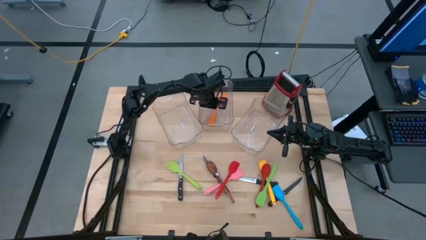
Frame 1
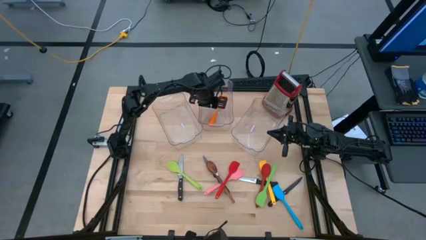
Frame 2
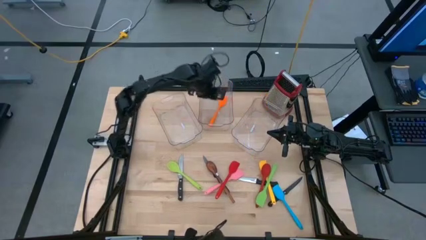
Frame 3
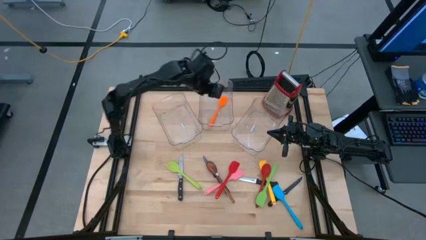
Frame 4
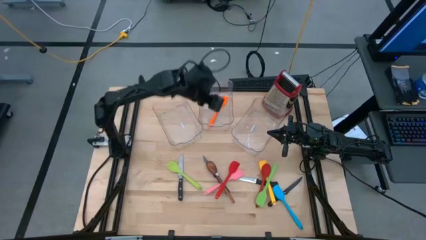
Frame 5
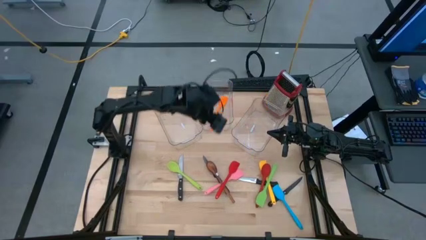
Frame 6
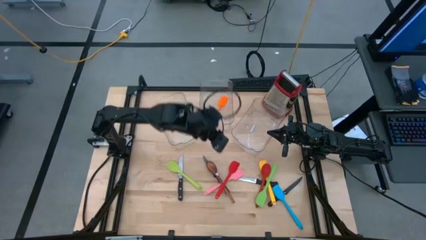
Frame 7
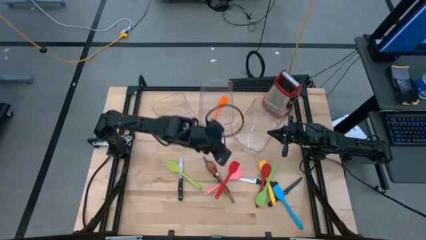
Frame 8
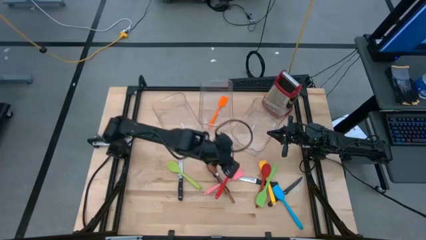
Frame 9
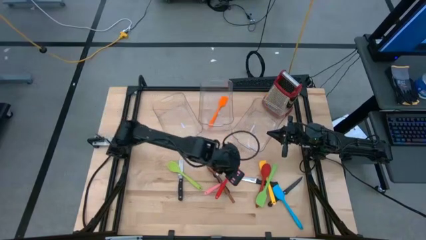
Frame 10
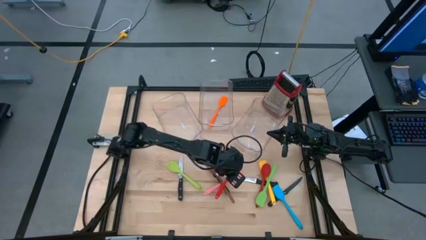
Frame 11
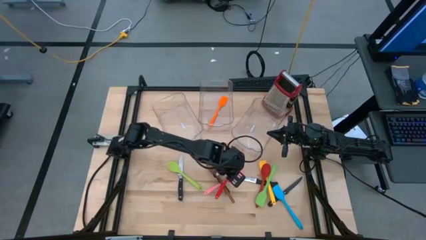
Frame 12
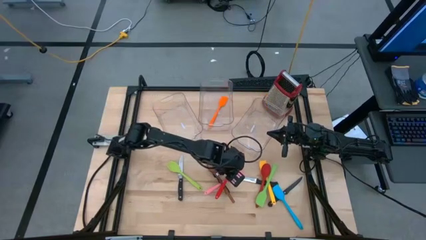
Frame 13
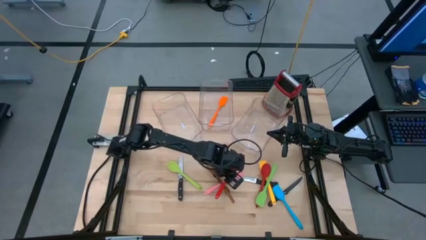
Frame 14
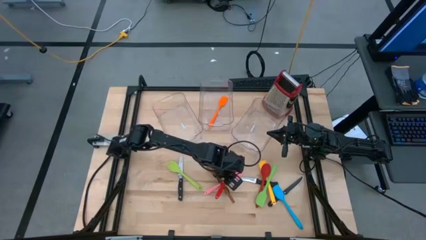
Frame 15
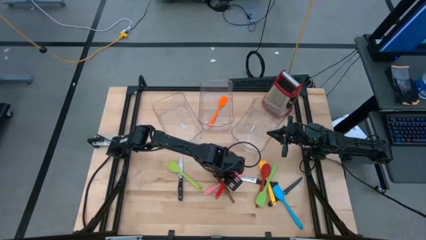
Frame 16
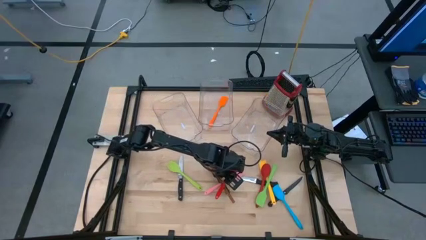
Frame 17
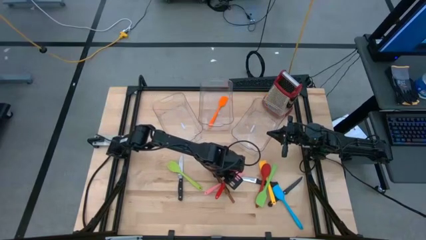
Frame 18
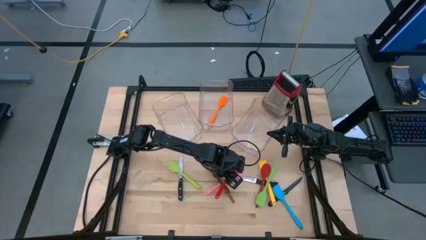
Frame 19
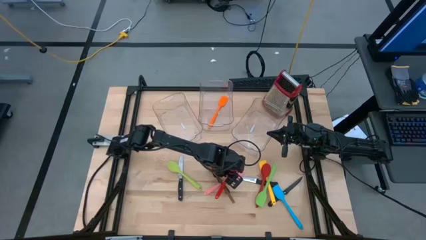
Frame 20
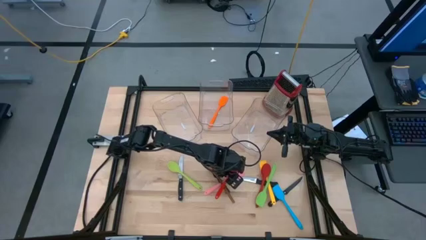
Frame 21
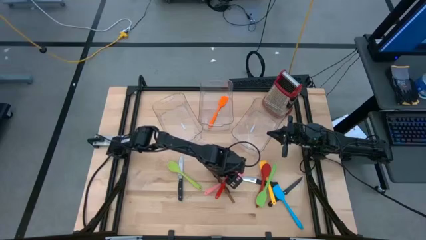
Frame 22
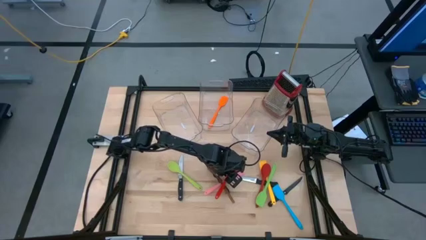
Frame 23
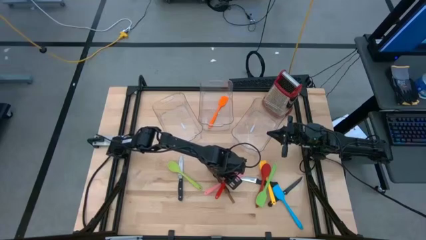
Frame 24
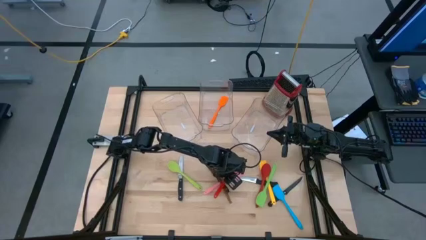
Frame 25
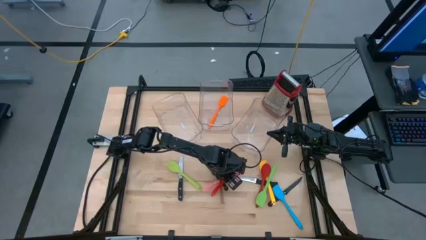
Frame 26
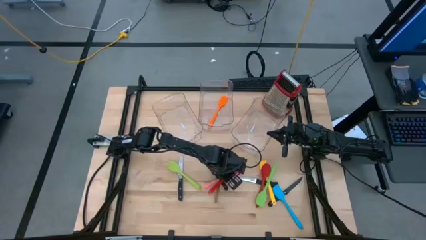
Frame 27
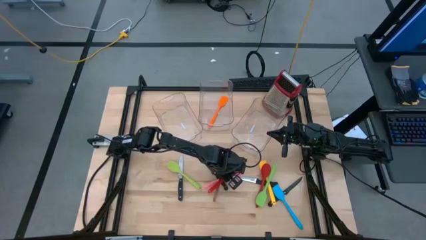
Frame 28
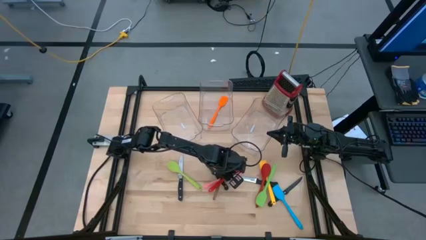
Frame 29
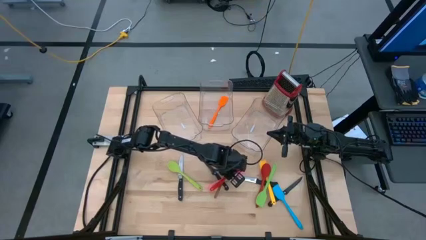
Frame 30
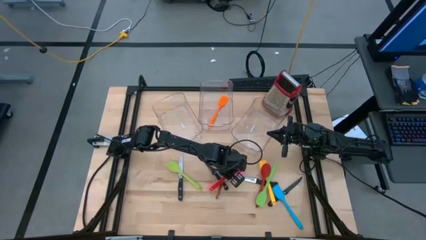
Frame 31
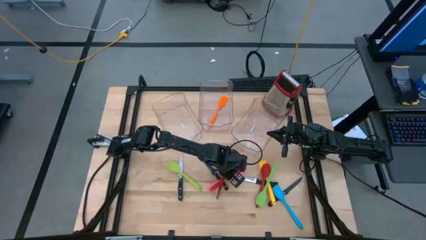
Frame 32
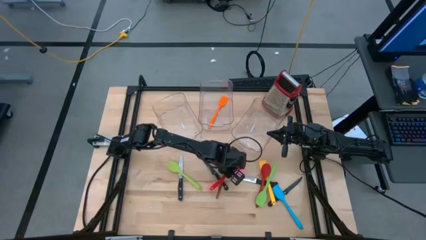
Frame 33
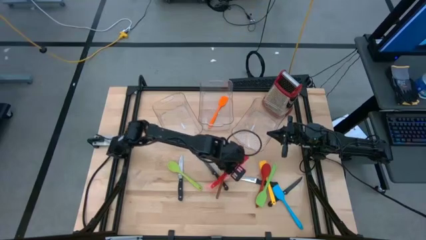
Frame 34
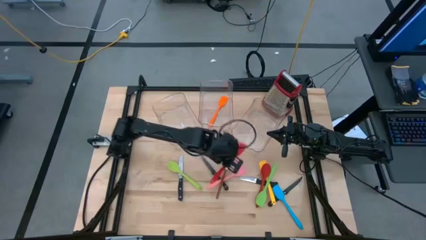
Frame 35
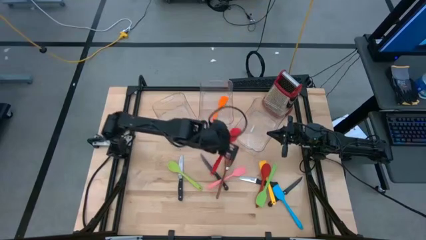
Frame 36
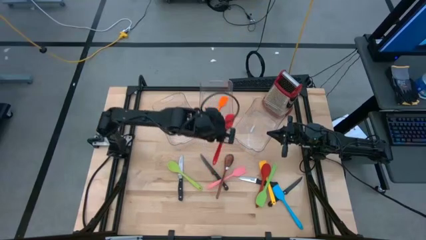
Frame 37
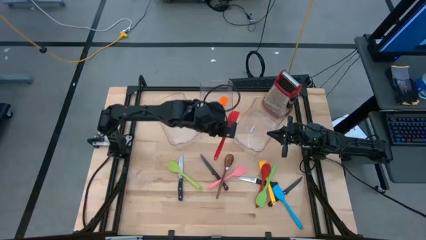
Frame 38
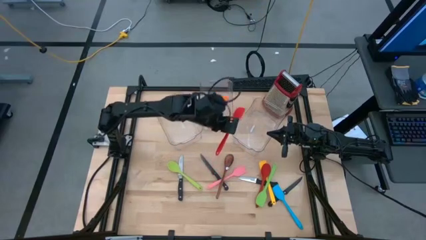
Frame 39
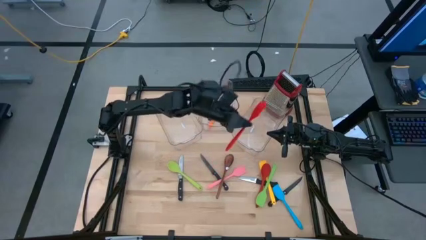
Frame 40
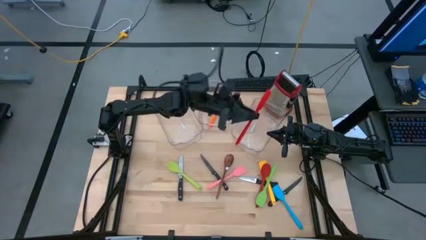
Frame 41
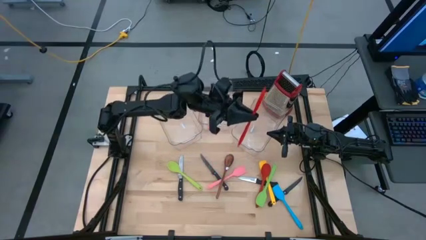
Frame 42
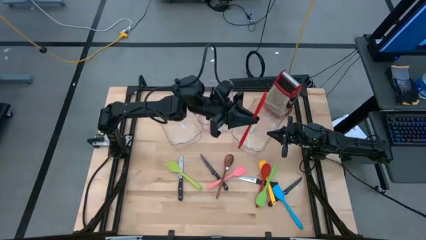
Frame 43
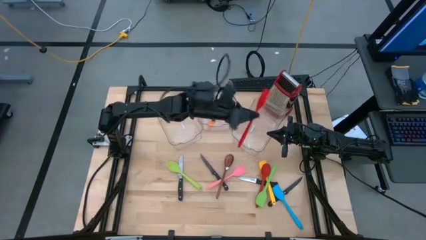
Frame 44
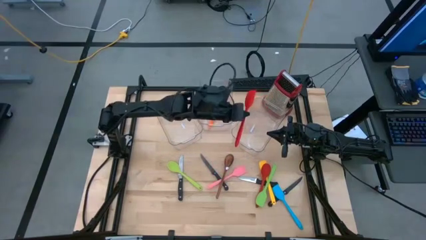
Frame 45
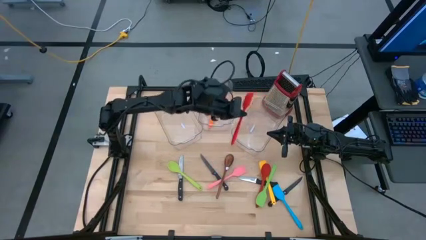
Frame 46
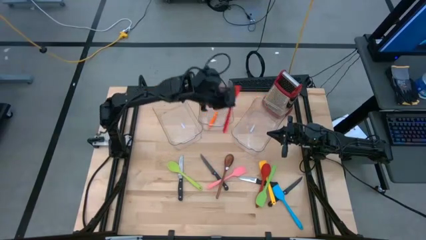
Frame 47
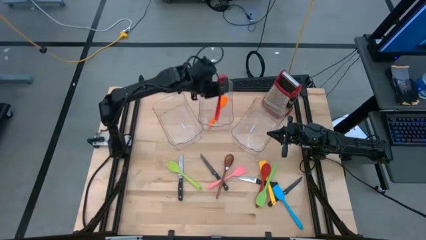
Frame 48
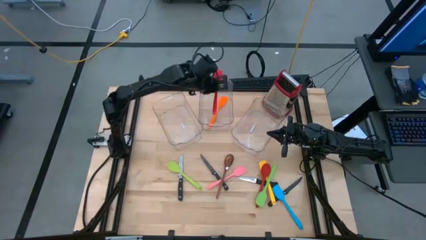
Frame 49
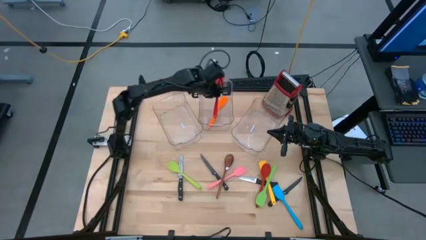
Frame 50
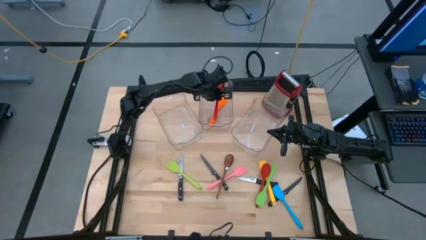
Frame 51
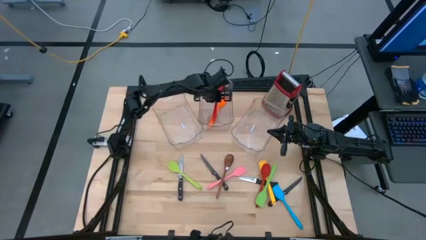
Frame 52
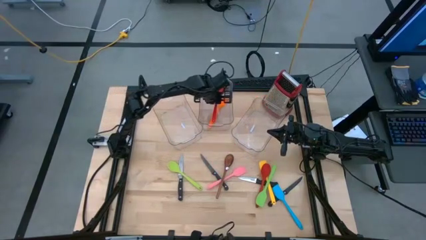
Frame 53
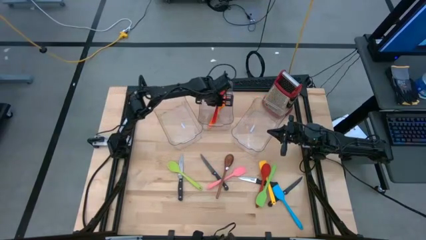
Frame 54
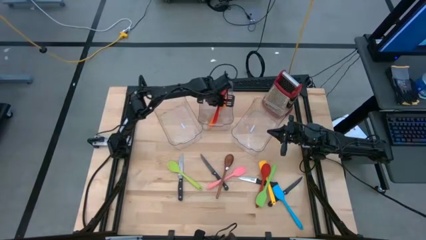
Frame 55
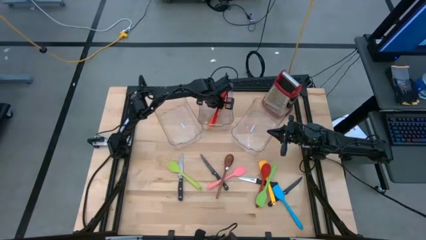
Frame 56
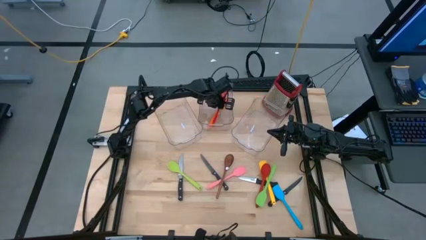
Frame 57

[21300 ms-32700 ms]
Task: Pick & Place Kitchen Items
Put the red spatula in the middle bin

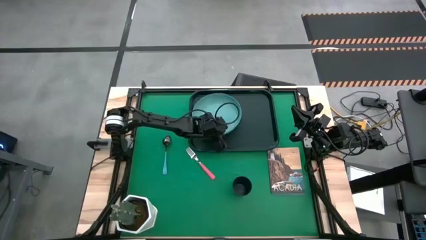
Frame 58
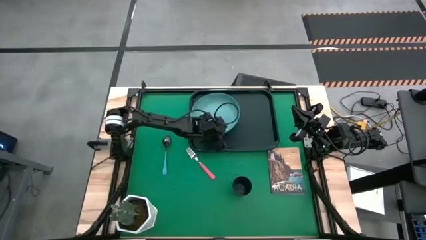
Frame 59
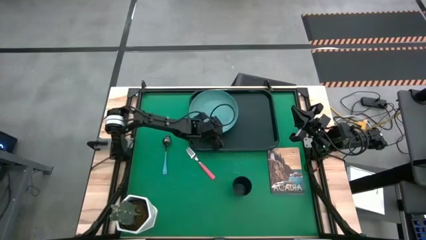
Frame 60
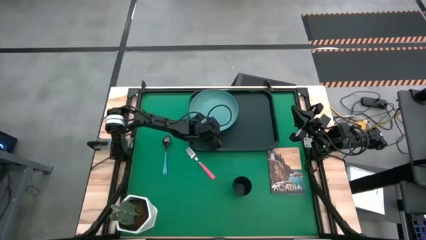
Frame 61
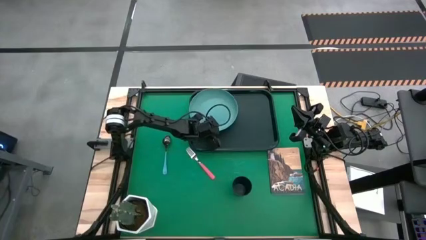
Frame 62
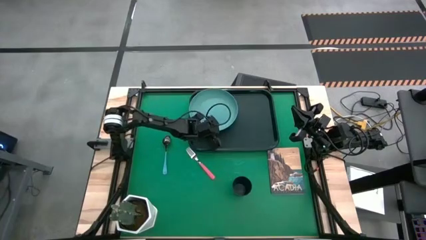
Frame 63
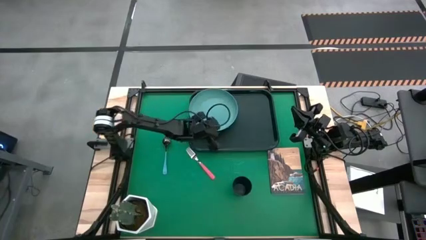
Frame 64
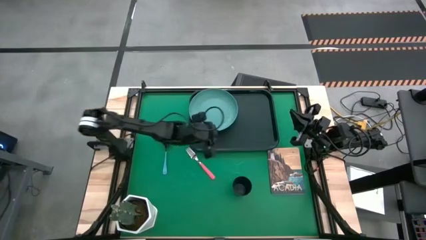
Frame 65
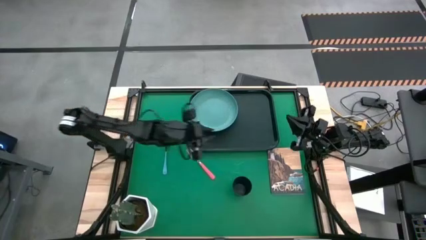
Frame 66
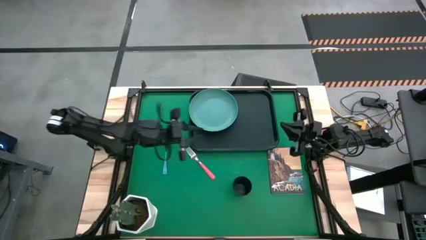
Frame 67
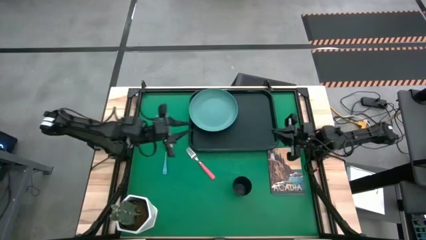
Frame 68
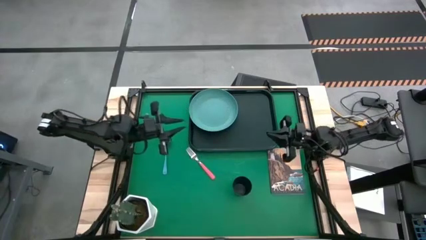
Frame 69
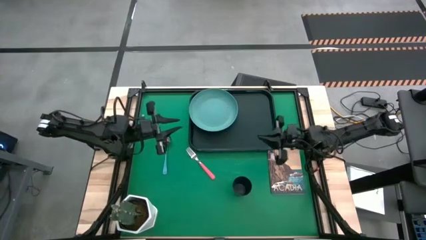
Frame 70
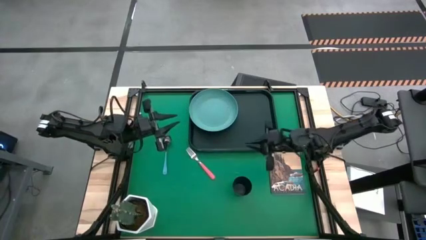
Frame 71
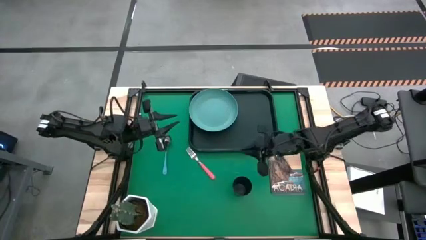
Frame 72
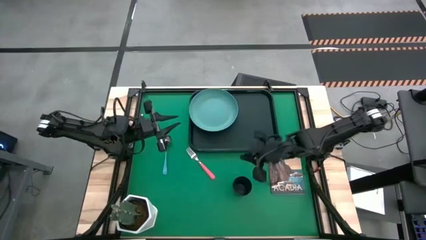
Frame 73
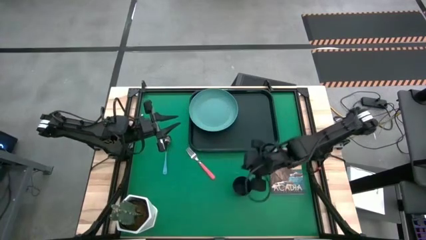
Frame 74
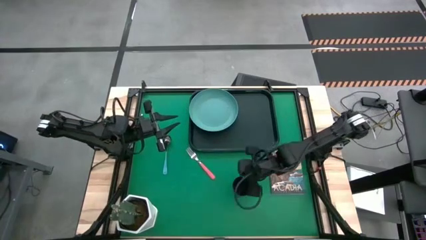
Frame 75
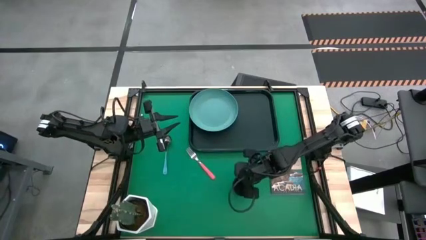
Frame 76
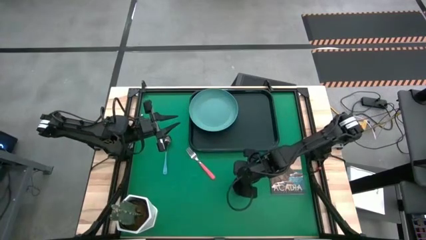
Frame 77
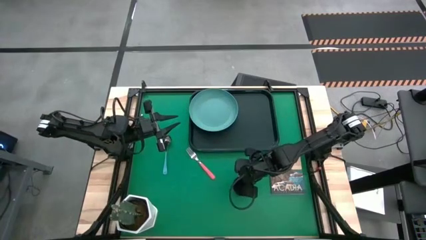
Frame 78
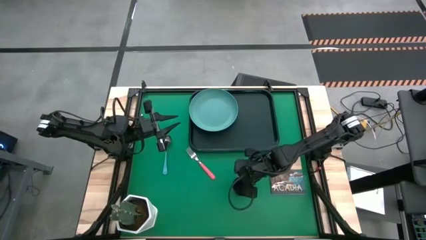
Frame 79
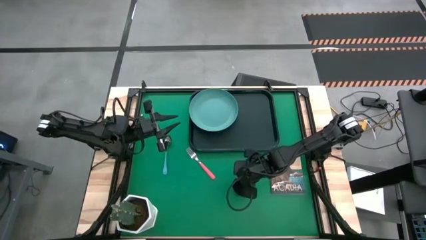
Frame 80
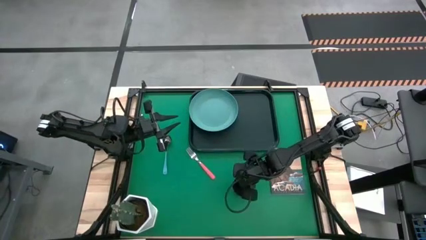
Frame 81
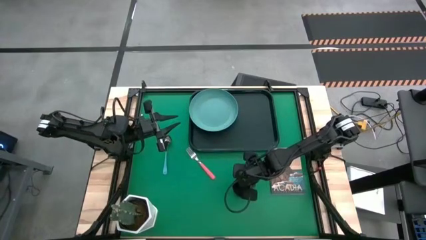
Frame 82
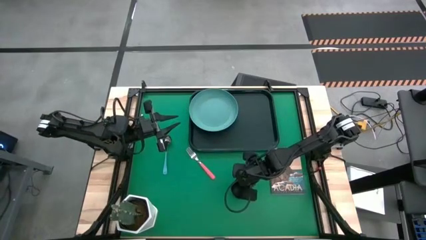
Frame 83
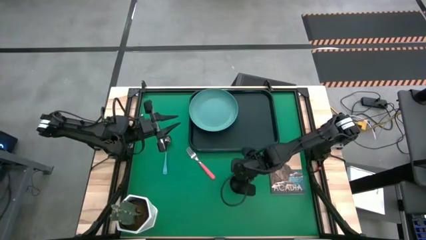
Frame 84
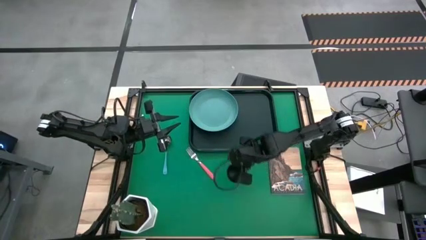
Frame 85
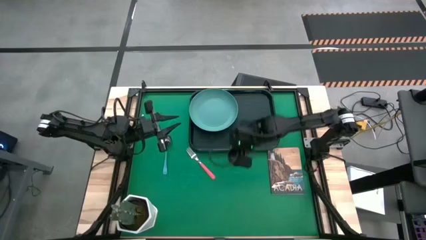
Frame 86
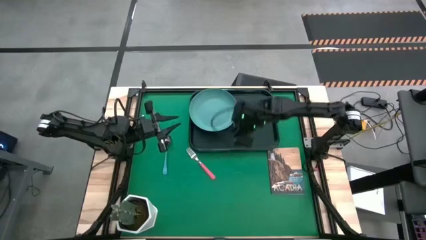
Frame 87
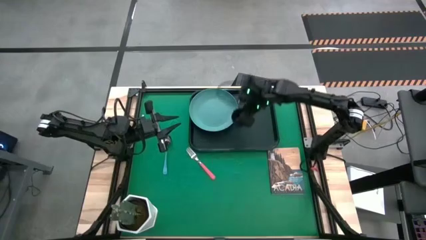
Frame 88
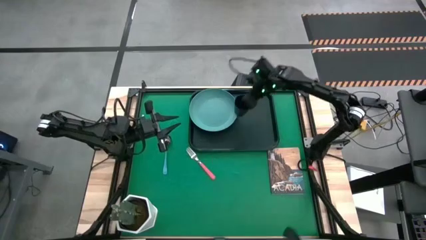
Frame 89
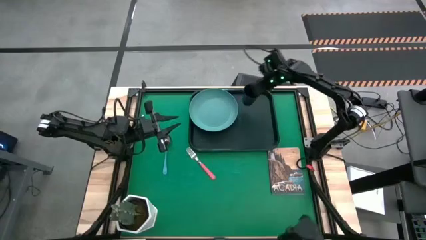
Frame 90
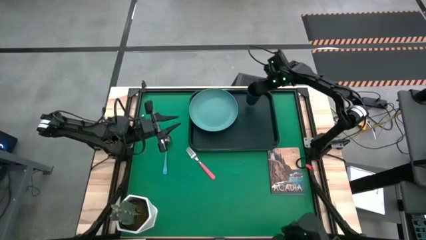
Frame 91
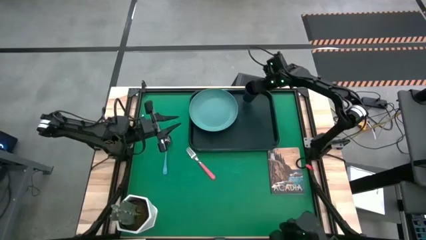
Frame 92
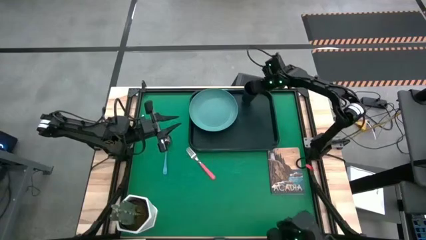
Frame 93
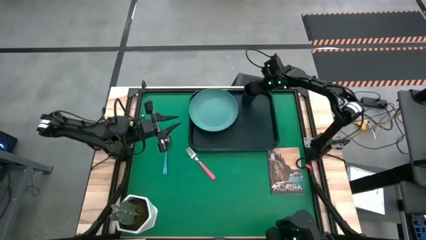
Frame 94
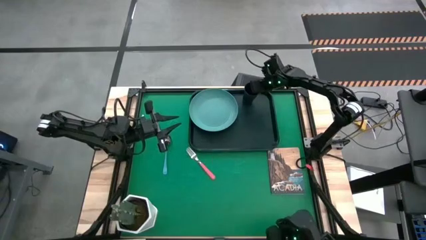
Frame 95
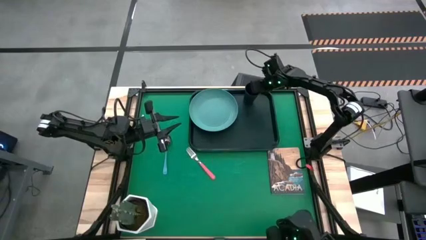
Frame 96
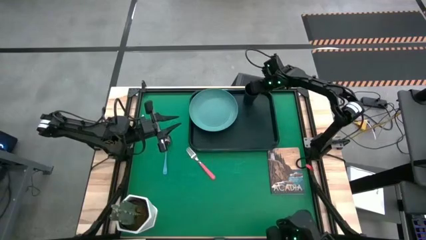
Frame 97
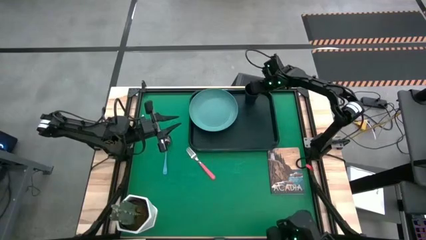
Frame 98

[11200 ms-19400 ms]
Task: Pick and place plate/cup/fork/spoon on tray
Put the black cup on the black serving tray to the right of the green plate
